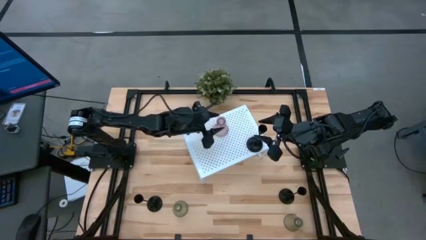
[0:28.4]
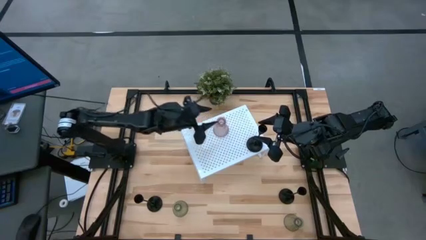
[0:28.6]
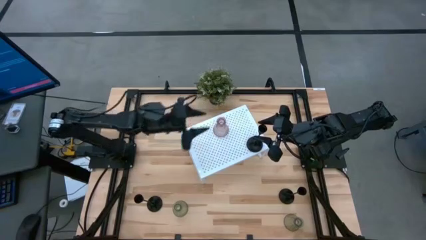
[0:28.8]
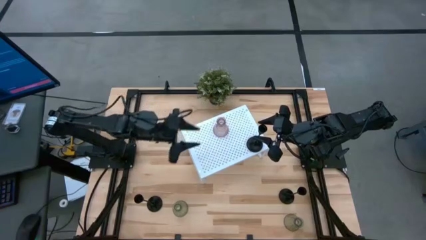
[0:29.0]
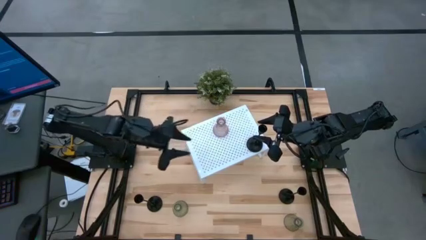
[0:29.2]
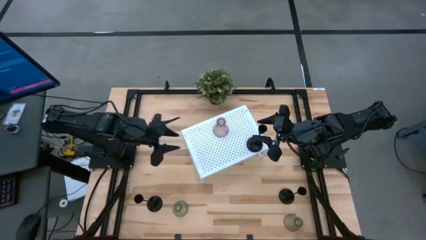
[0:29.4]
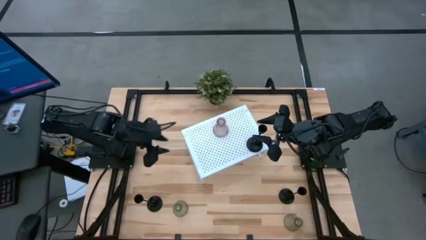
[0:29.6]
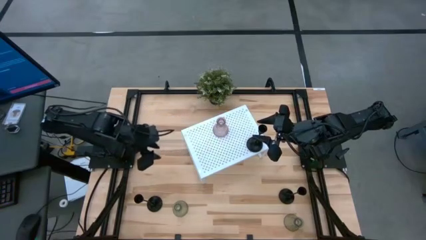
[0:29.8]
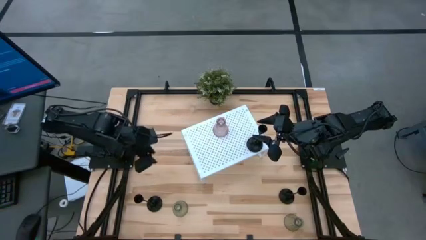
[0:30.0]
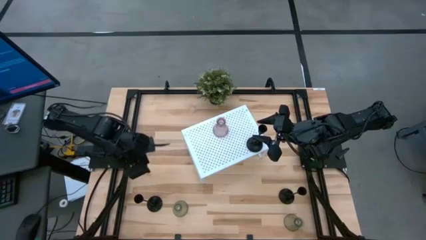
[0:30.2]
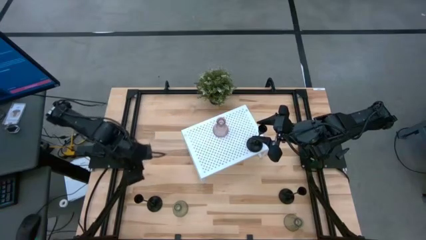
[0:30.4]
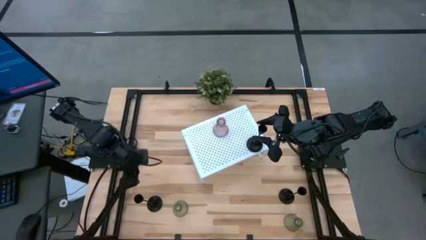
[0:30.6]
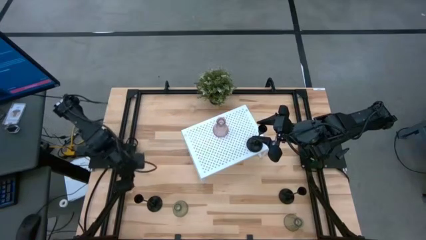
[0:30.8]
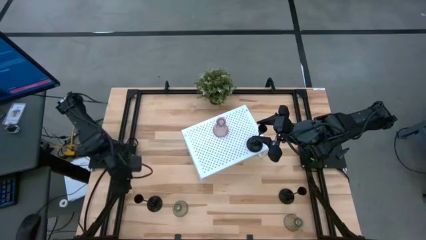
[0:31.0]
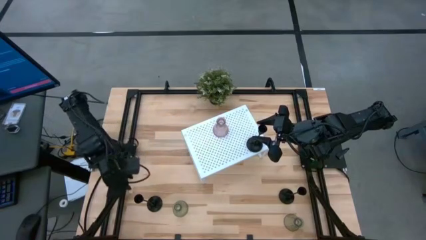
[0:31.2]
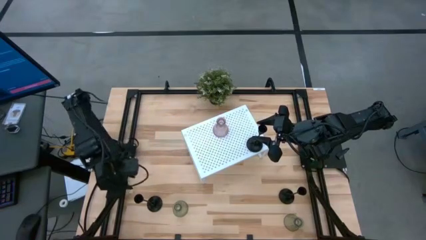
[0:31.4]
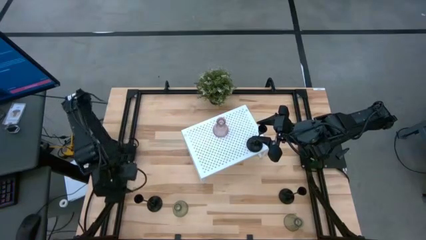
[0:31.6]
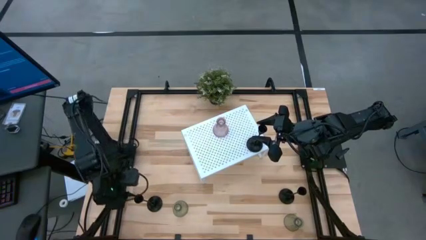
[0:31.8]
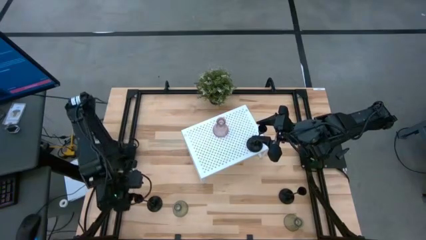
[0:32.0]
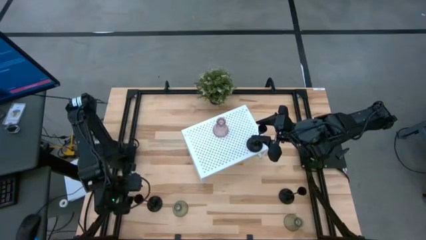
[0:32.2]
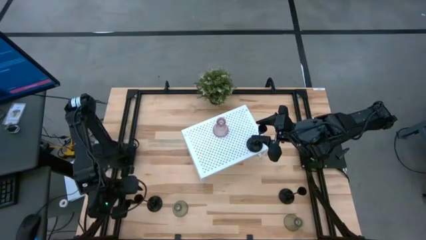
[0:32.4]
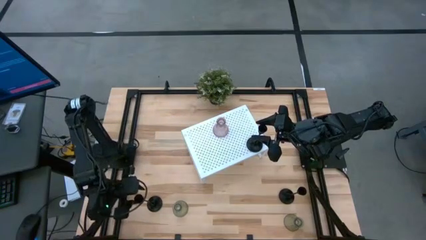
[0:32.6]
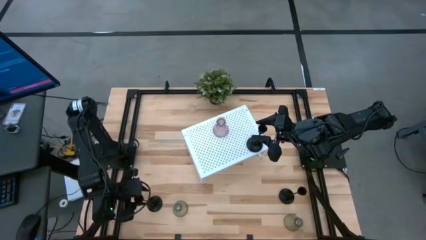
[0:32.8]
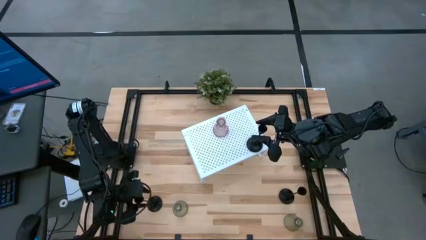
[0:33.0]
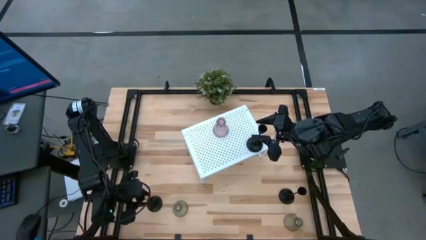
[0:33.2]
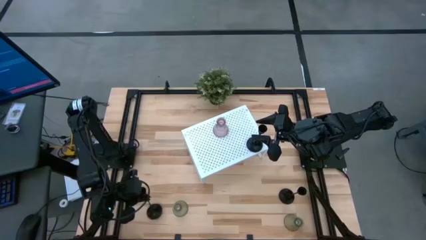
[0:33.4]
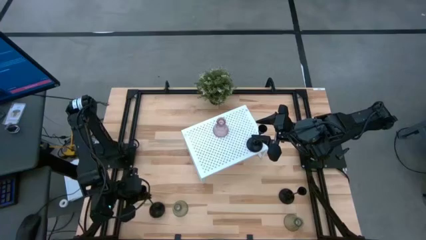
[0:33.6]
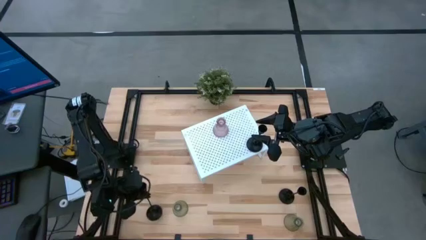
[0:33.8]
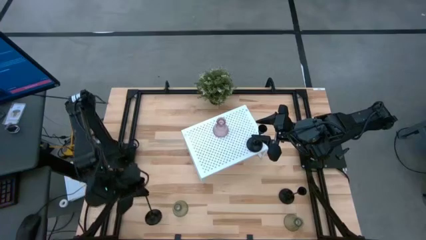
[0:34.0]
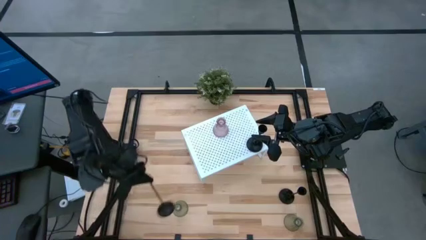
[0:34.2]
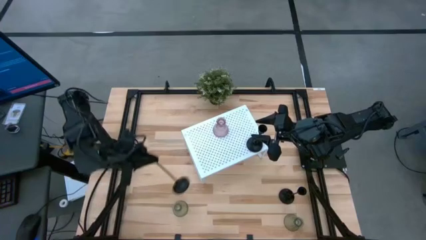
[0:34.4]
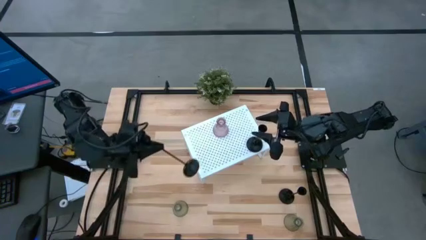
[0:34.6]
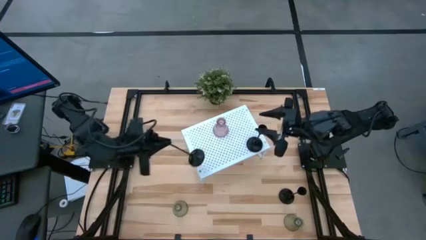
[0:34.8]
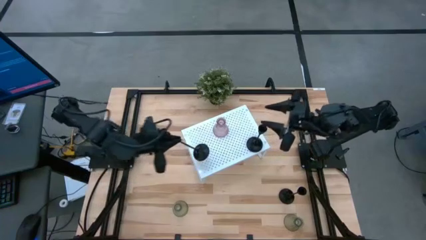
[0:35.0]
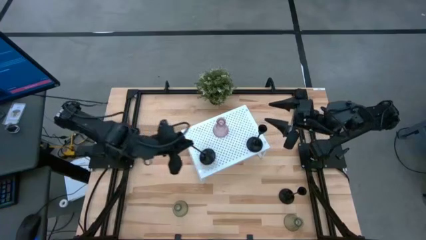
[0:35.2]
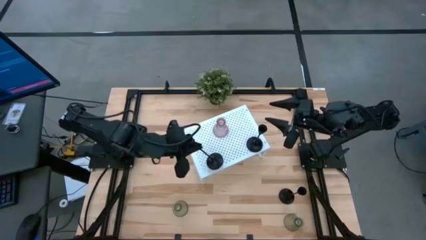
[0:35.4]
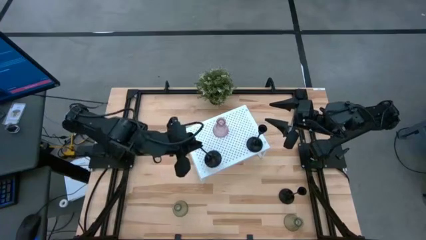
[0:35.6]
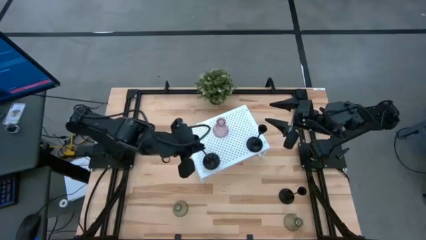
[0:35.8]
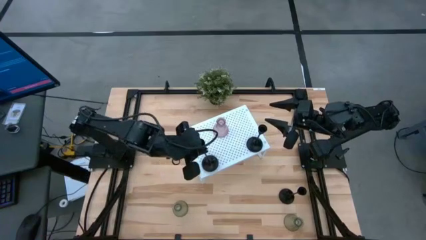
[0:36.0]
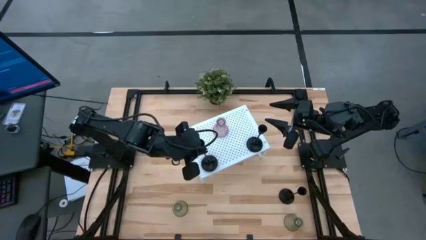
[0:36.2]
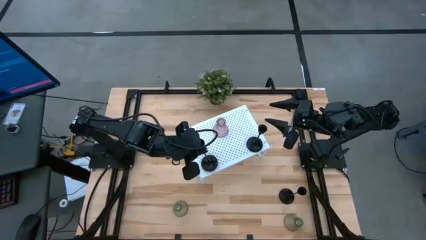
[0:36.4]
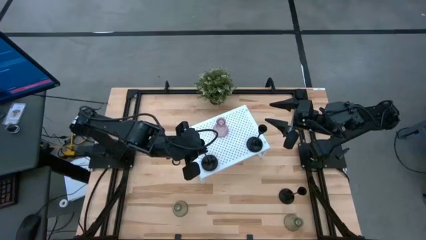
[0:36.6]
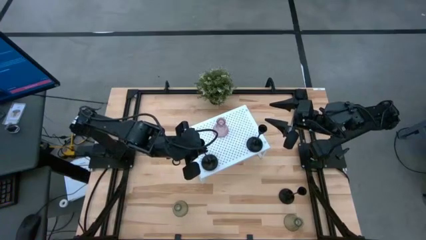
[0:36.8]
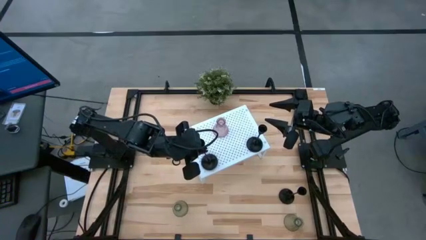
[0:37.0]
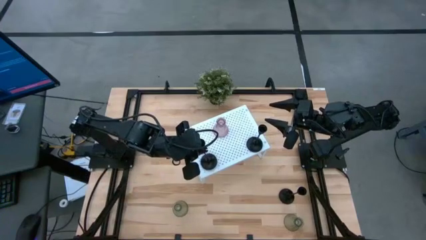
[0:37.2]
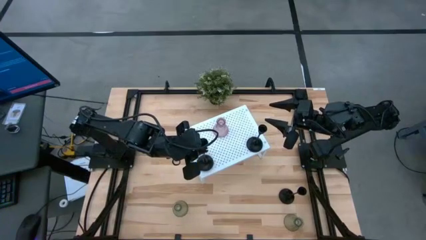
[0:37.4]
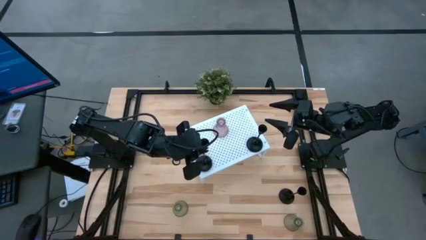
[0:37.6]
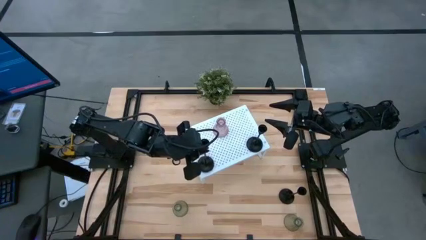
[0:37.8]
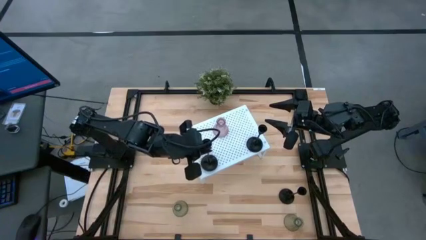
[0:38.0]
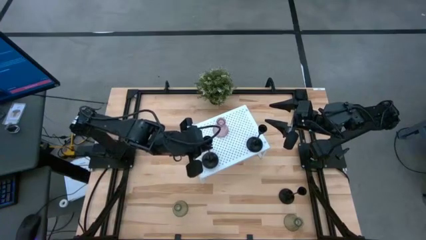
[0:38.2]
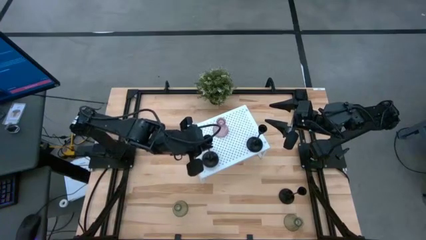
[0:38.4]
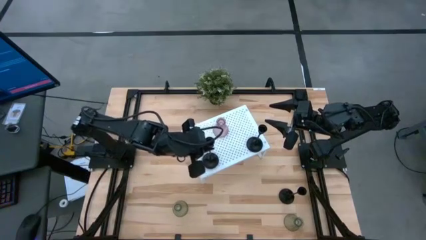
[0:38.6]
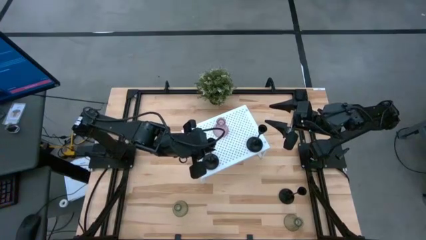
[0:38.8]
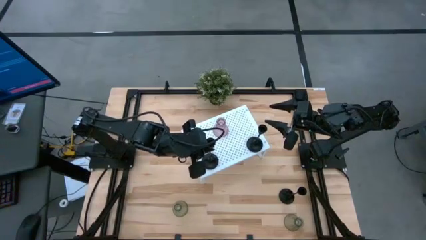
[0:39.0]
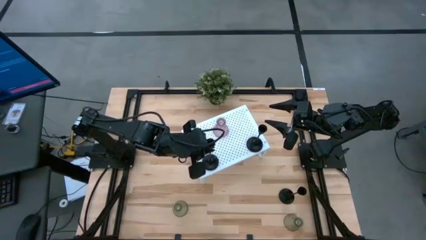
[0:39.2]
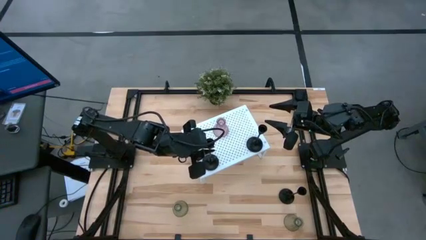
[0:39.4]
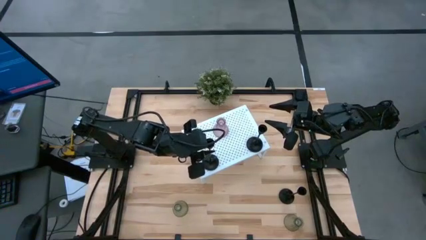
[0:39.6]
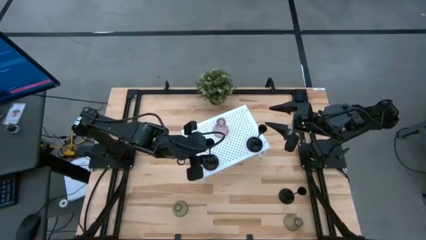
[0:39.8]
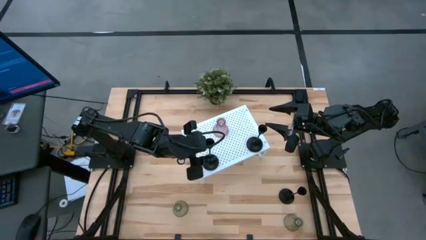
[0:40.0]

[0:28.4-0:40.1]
Task: Pick & Place candle stick holders
Put the left black candle holder onto the shelf
